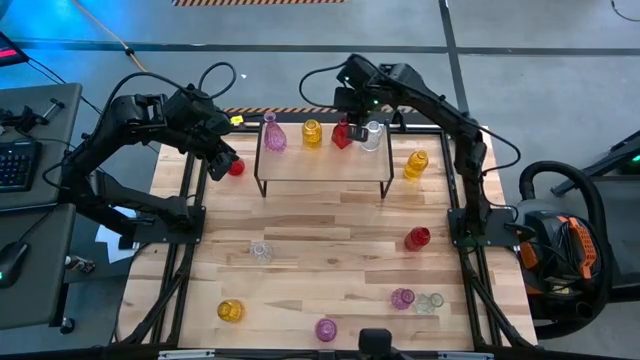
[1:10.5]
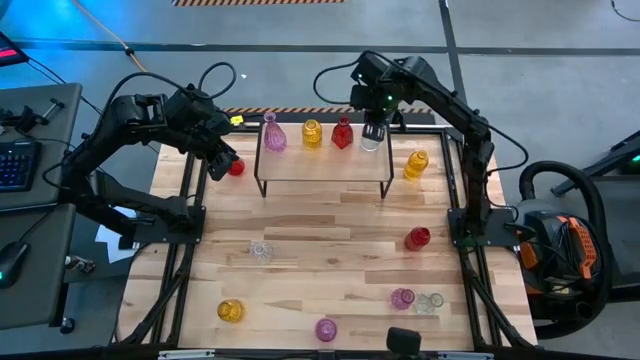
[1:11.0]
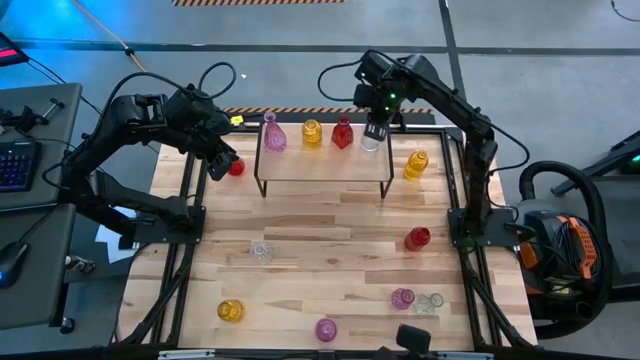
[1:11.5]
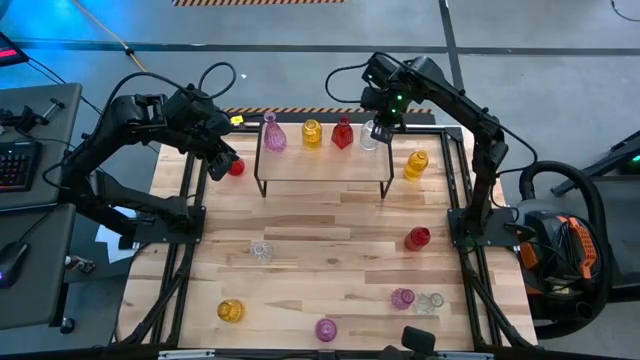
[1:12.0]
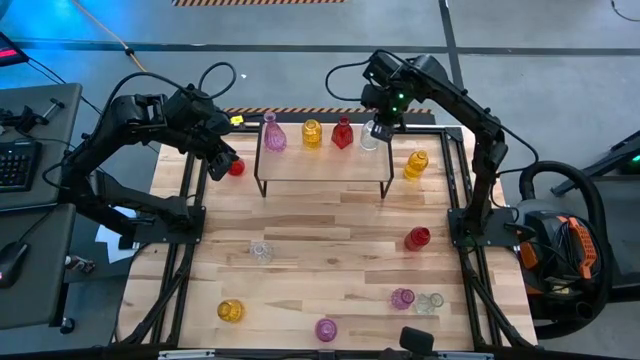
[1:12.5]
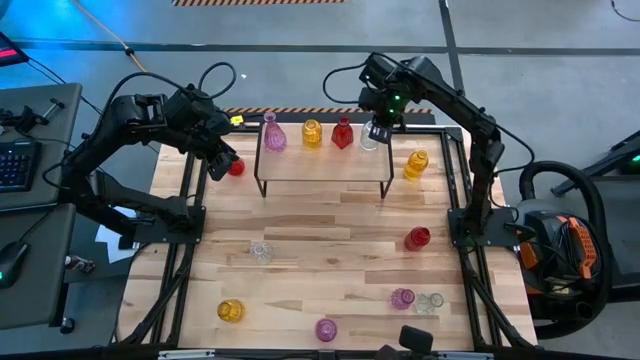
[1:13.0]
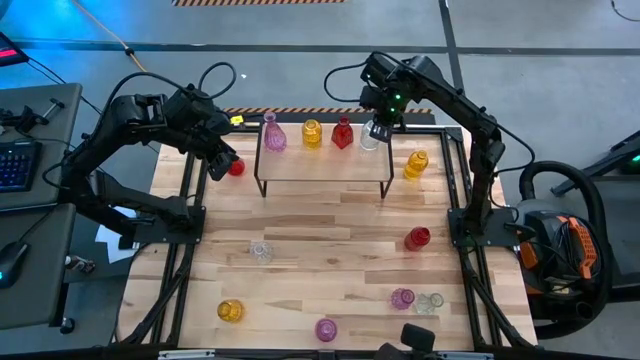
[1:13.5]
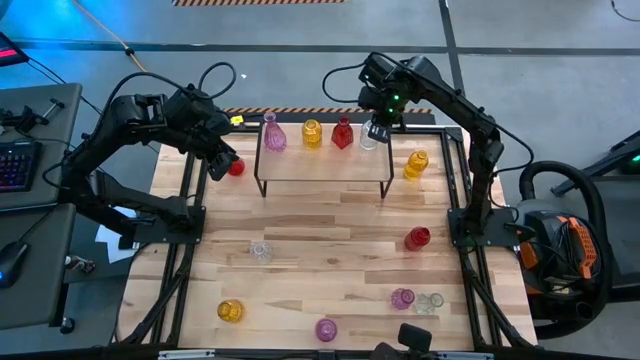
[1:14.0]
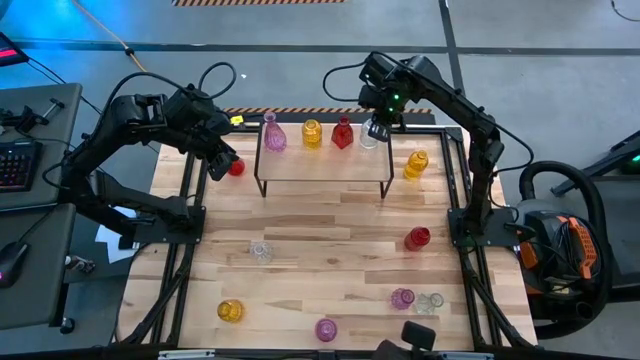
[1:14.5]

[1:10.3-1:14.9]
Task: sort vases onto shelf
Adjust the transparent vase on the shelf

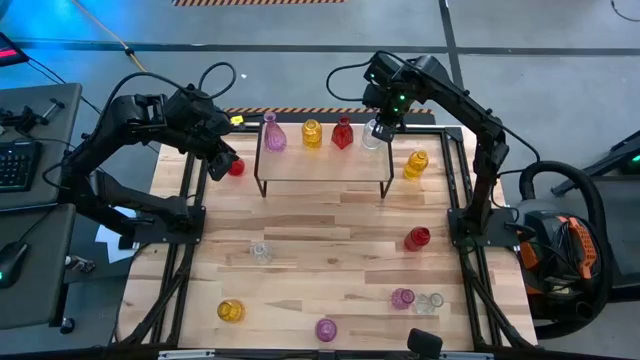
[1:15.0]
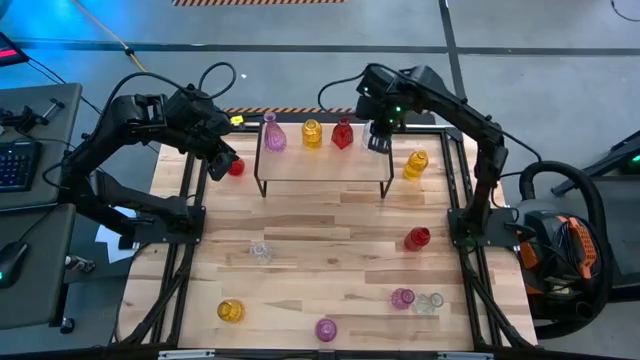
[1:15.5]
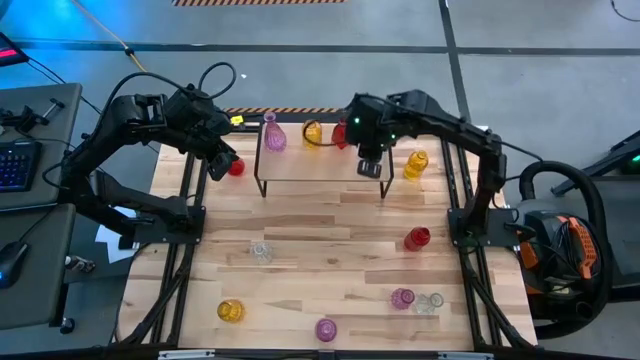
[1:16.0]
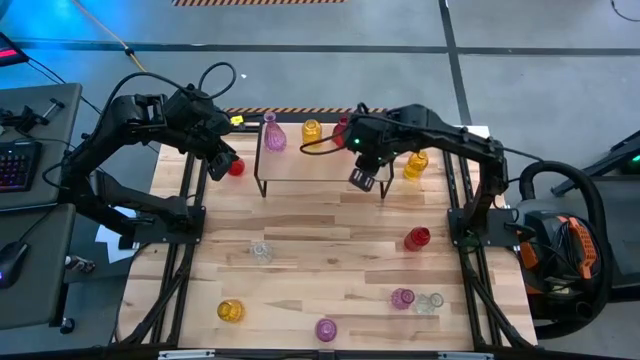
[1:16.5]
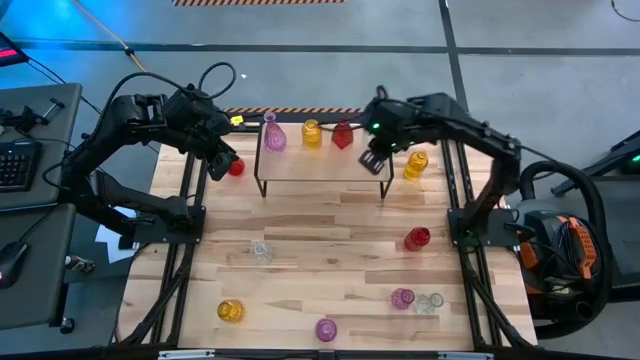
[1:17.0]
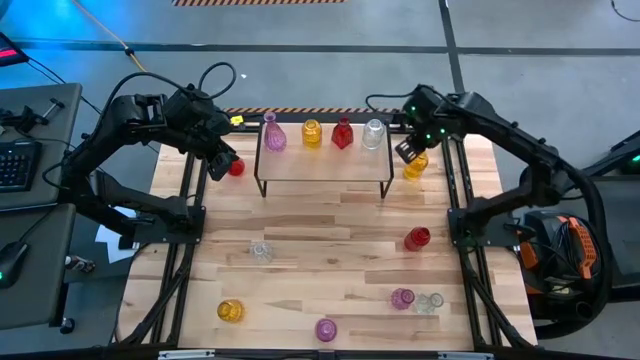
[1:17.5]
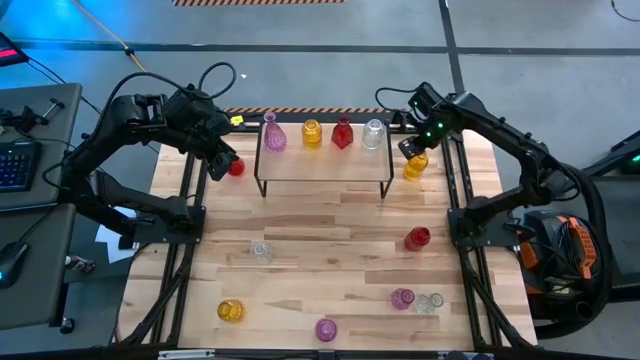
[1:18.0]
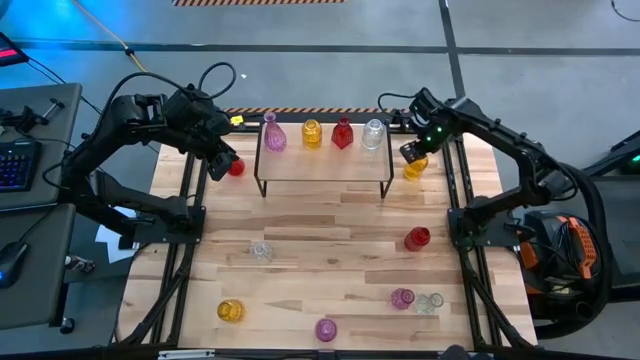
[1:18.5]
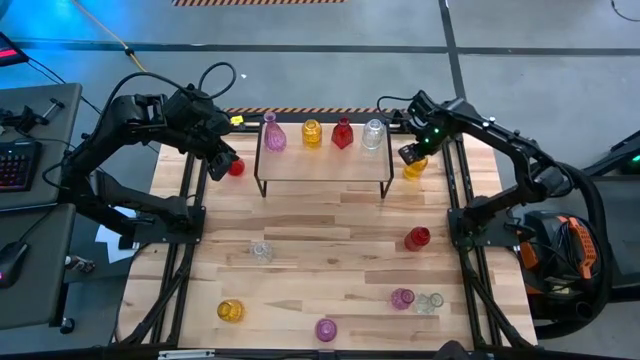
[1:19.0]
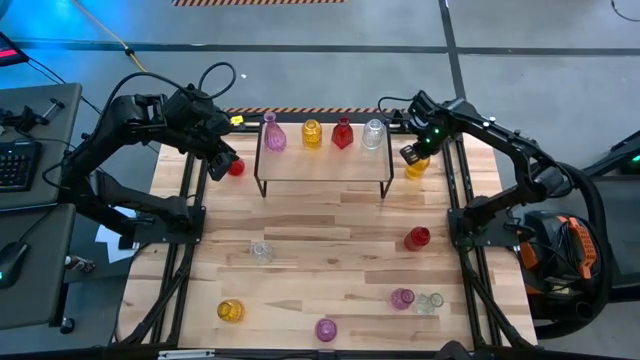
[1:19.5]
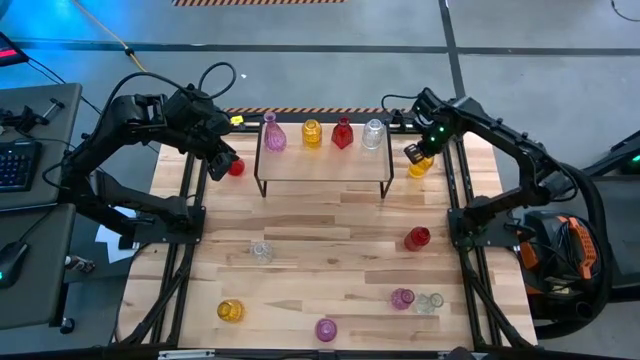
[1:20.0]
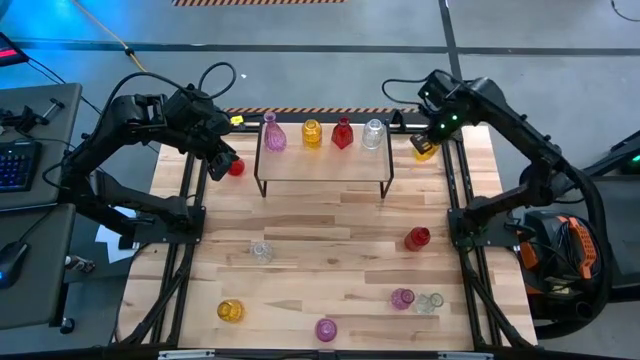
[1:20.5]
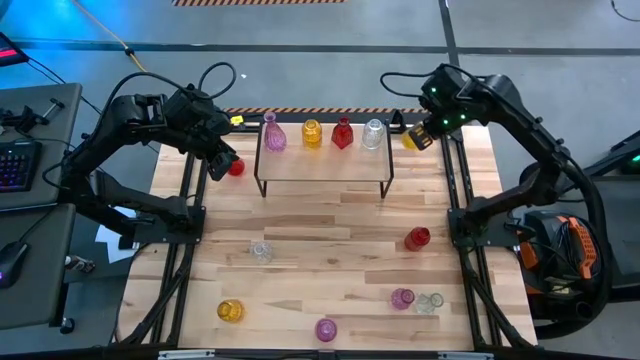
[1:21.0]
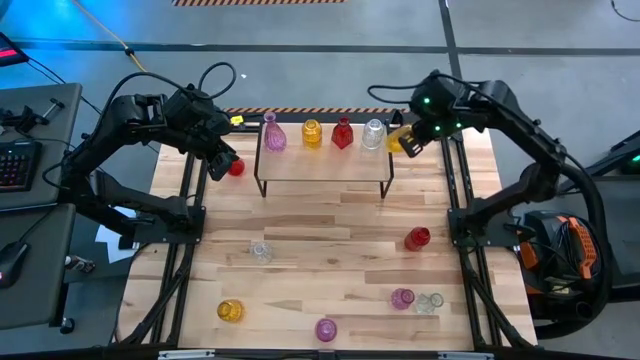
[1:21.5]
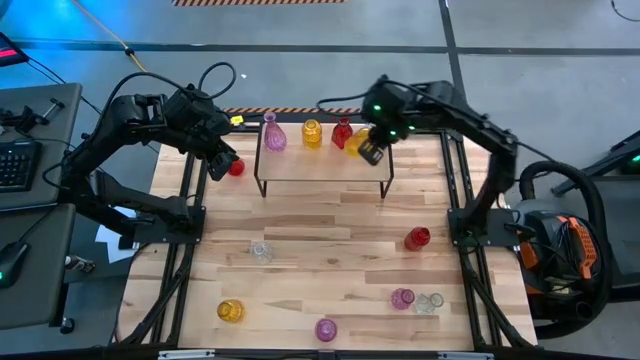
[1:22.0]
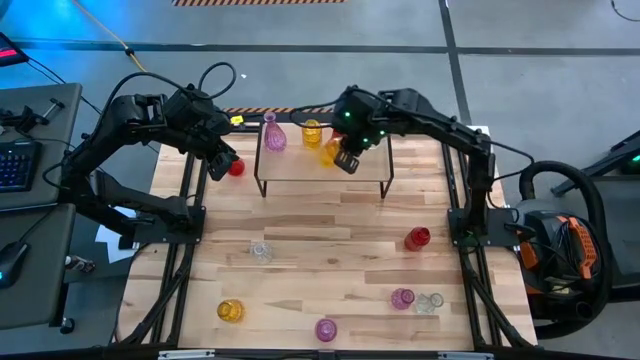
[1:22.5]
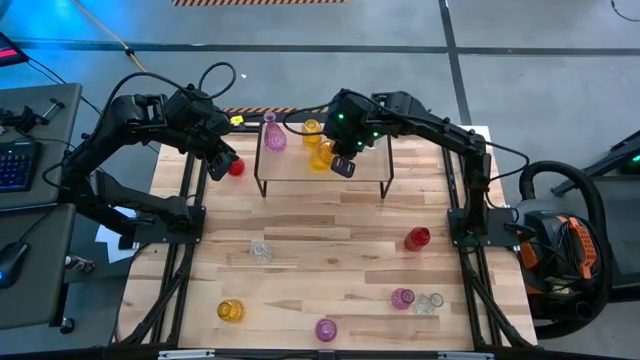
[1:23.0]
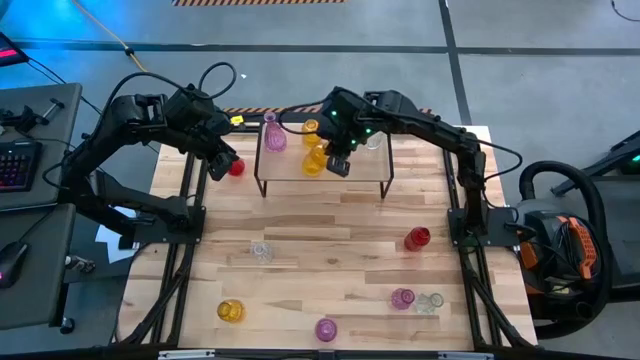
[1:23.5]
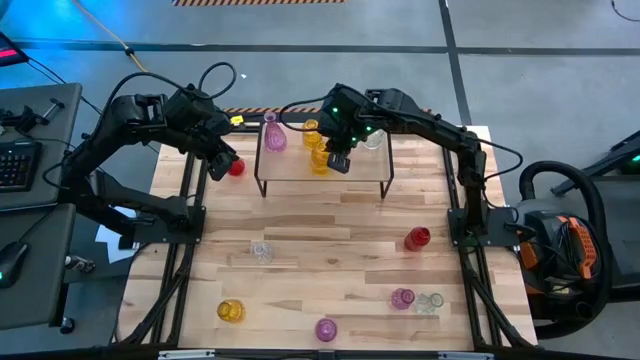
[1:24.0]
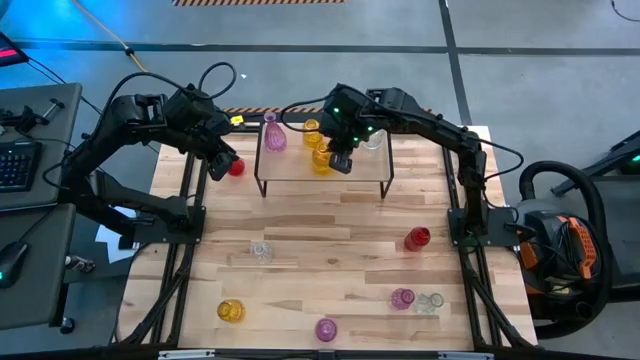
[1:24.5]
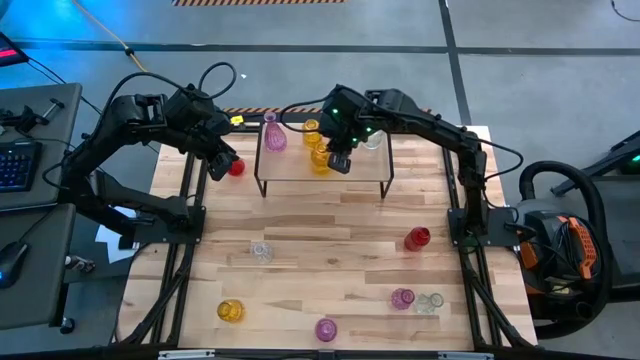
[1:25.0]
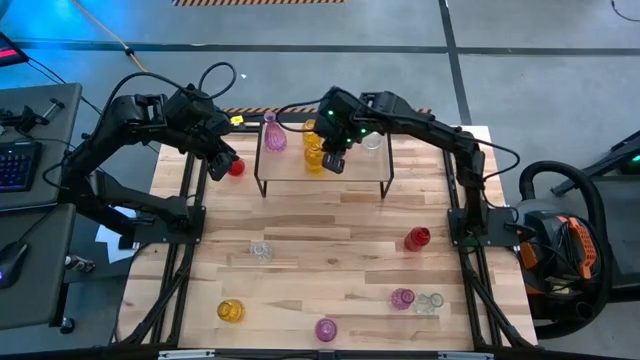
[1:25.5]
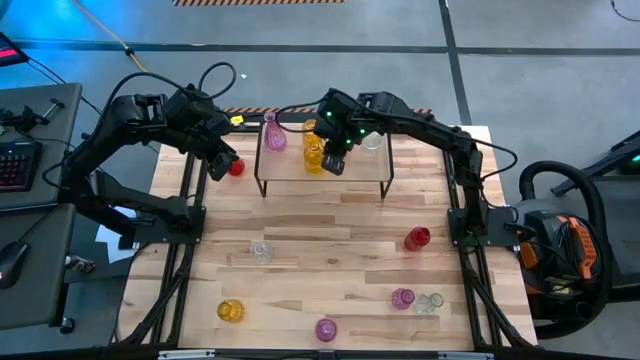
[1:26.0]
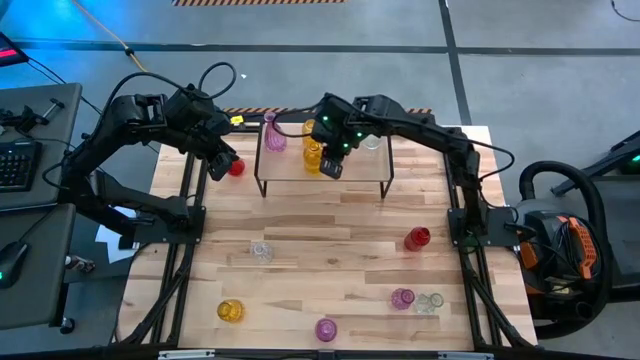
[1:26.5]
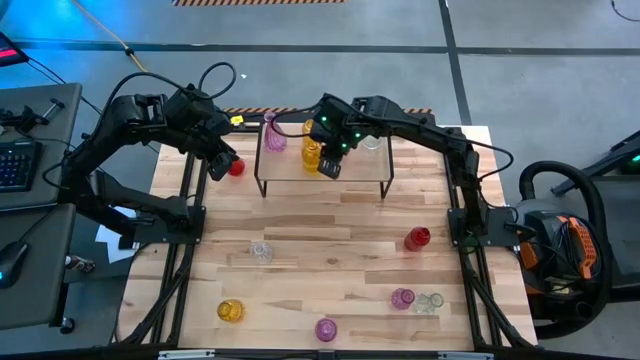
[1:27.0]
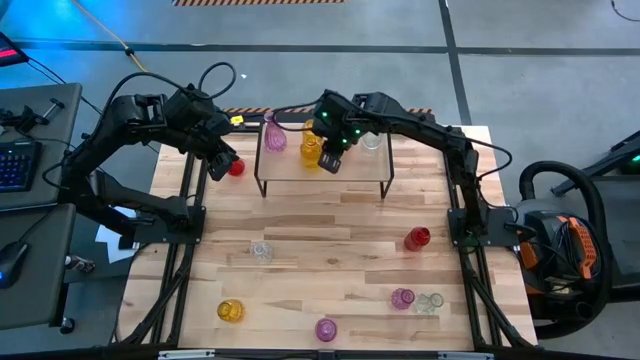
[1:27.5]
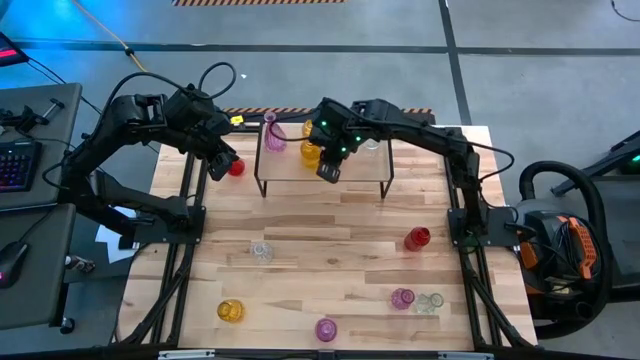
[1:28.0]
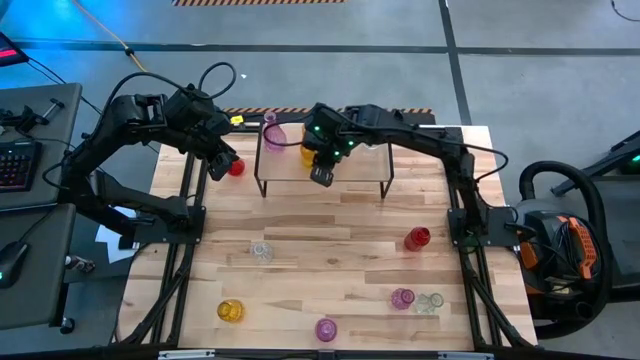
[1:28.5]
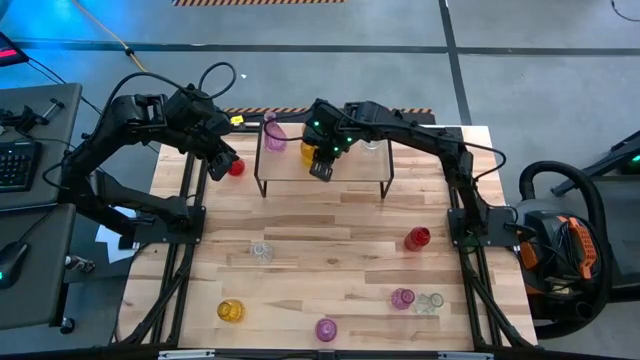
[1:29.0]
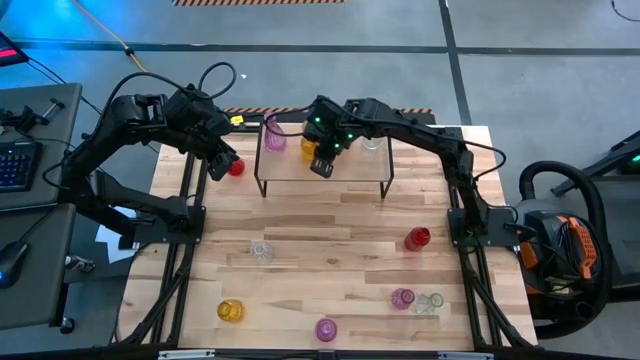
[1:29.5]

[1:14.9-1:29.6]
Put the top yellow vase on the shelf aligned with the other yellow vase

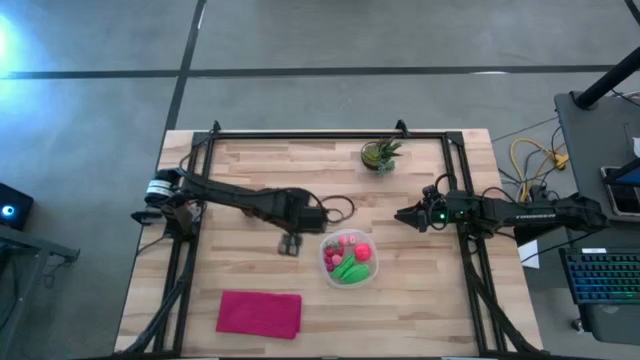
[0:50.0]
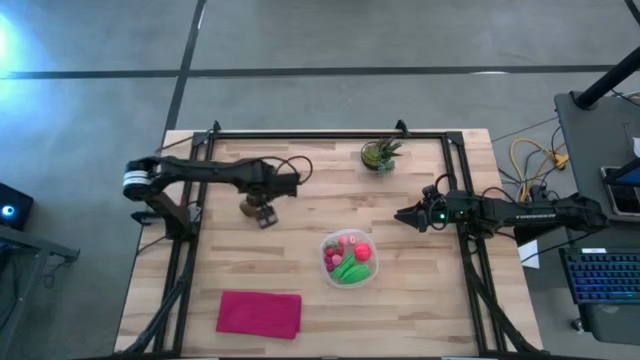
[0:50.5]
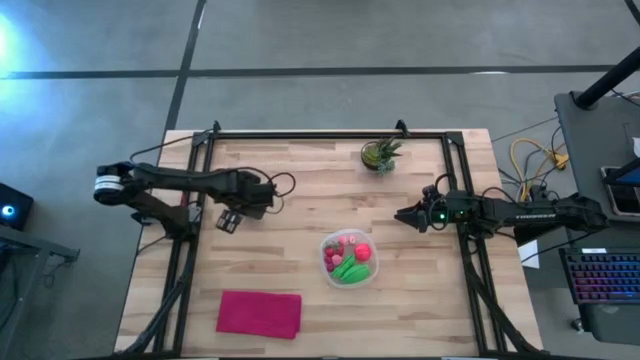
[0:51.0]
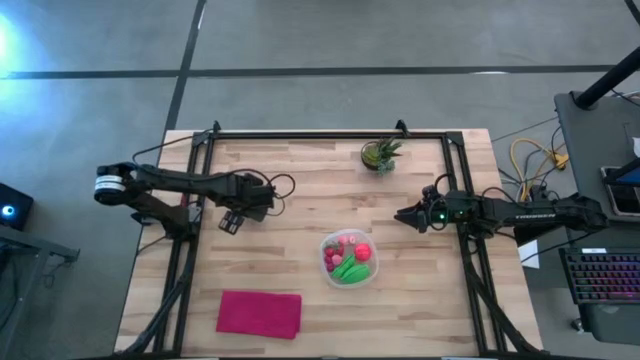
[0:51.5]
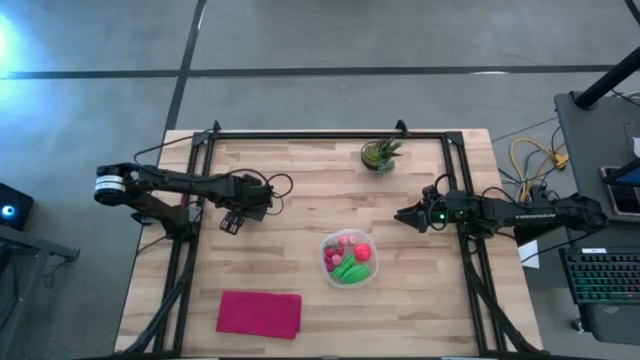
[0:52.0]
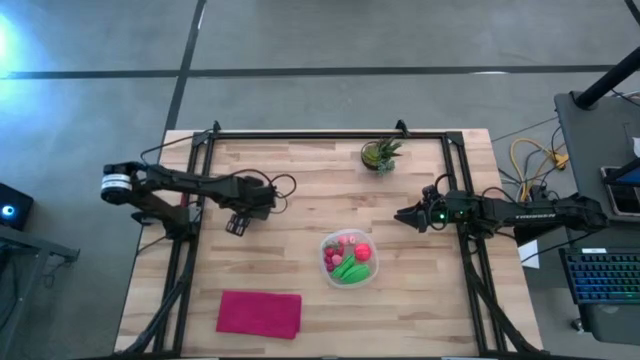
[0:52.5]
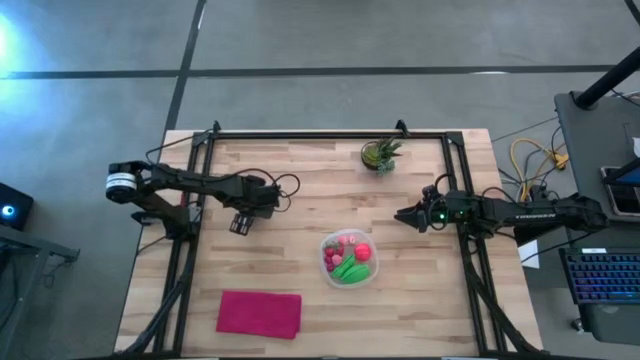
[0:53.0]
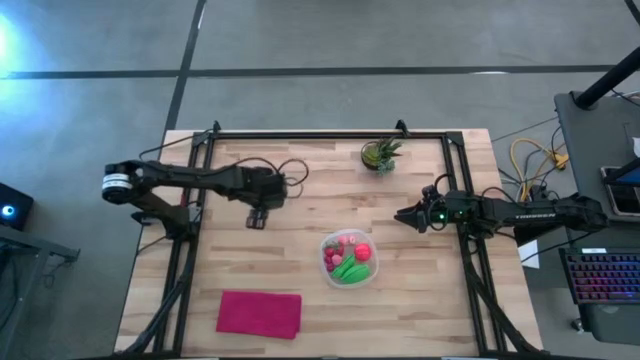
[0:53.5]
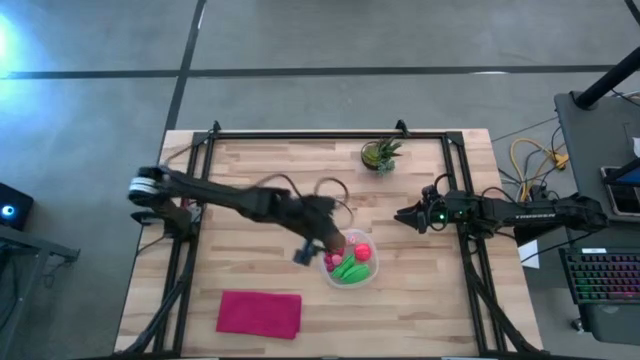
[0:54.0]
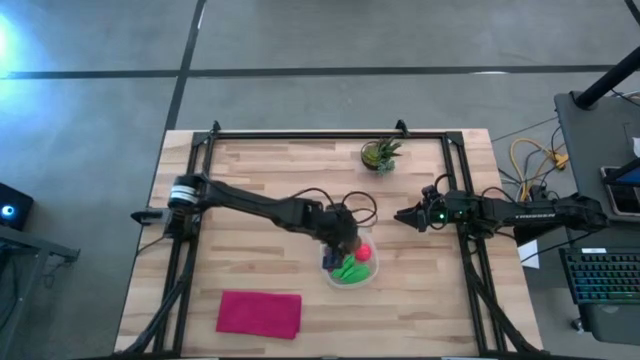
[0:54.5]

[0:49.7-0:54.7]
Task: Pick and placing Produce into tupperware
Put the kiwi into the container
